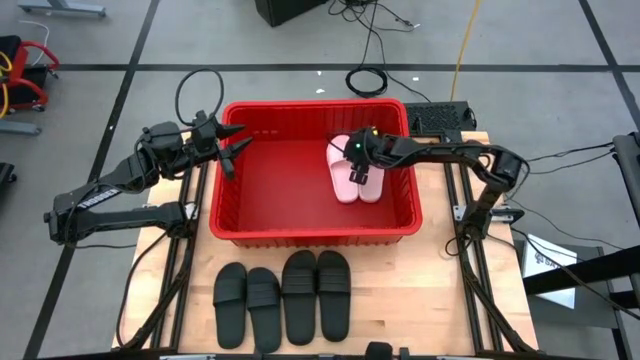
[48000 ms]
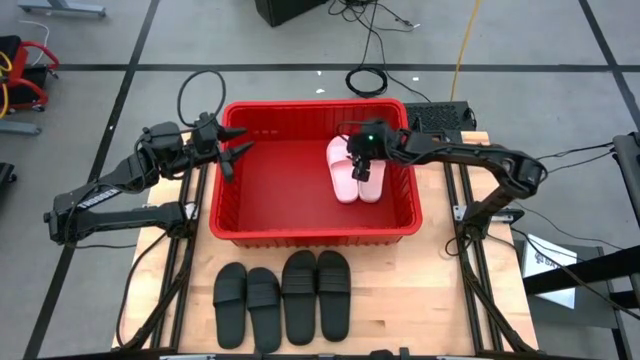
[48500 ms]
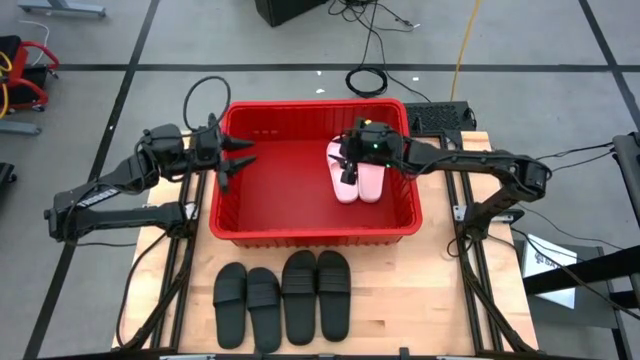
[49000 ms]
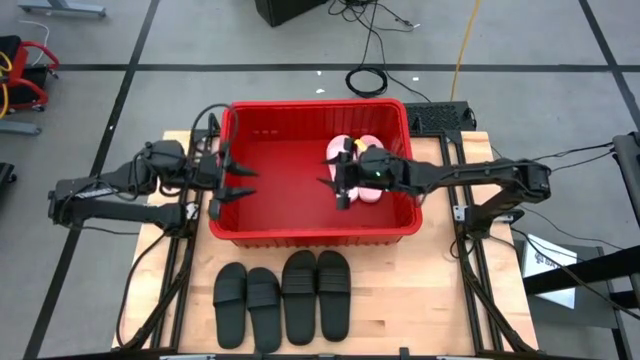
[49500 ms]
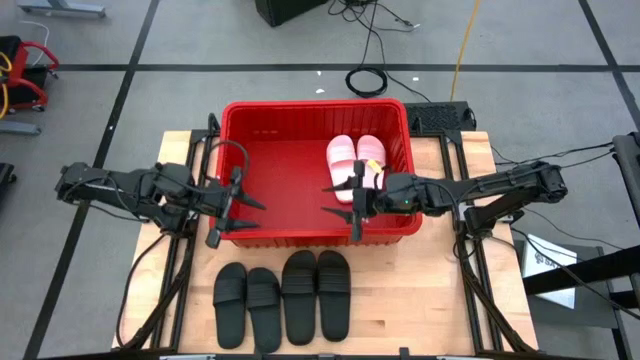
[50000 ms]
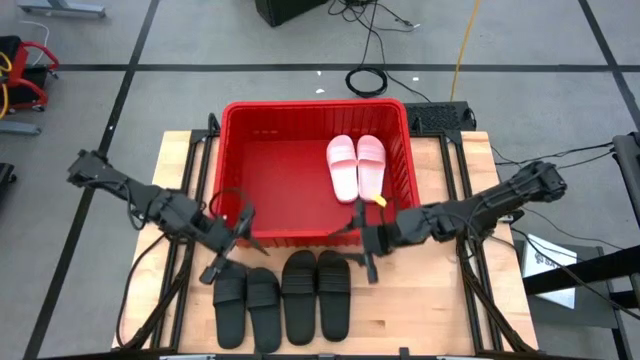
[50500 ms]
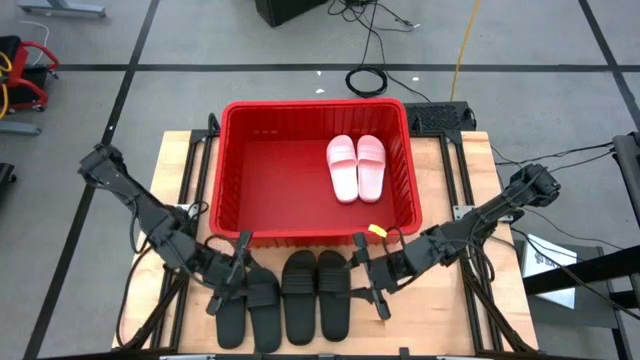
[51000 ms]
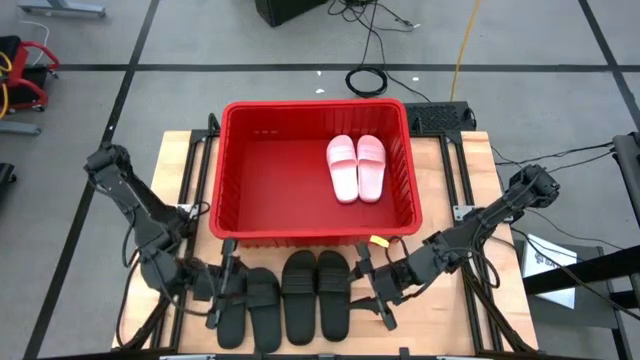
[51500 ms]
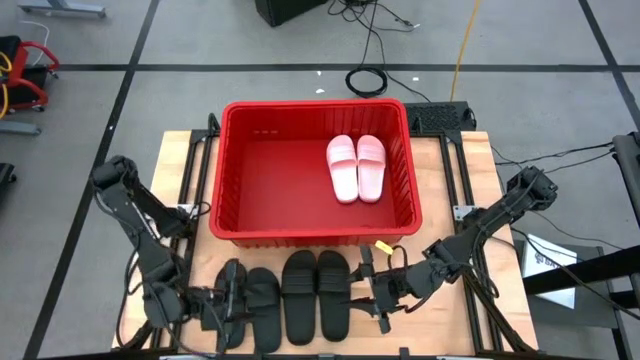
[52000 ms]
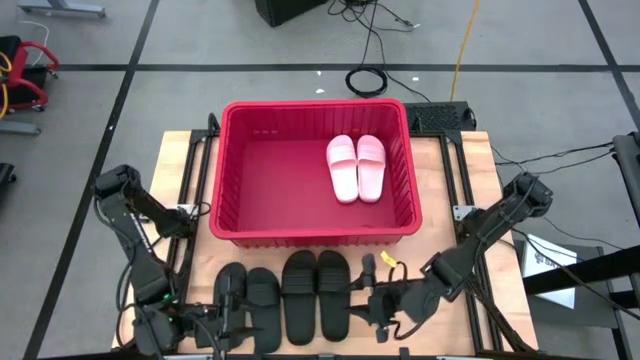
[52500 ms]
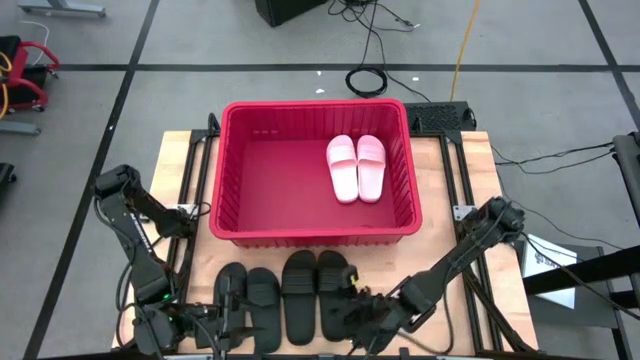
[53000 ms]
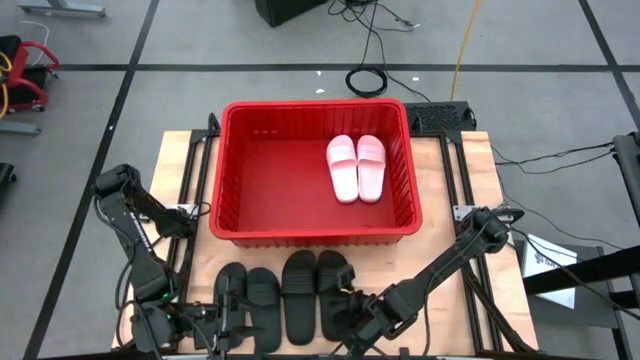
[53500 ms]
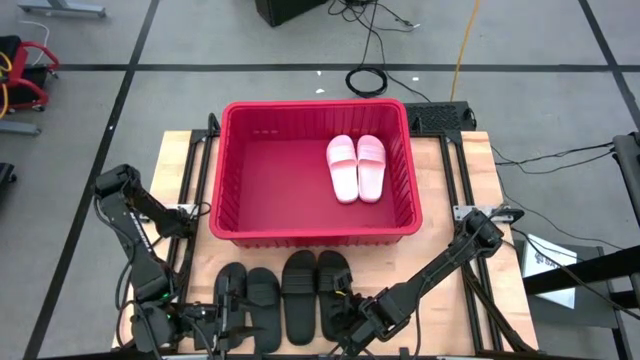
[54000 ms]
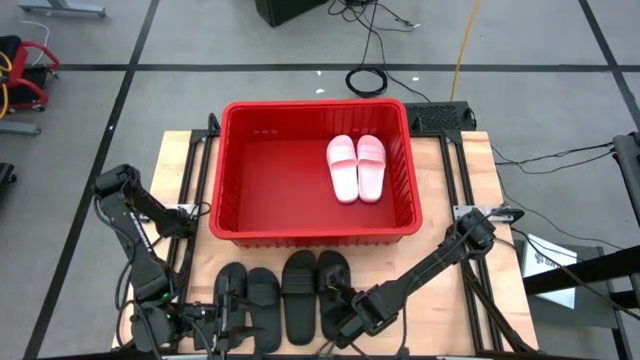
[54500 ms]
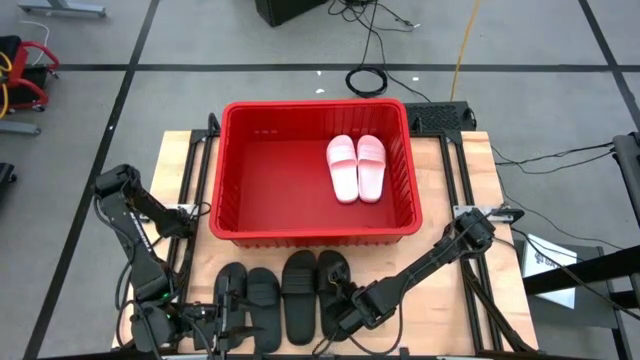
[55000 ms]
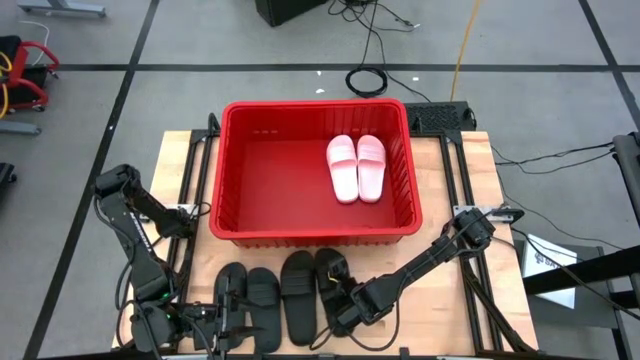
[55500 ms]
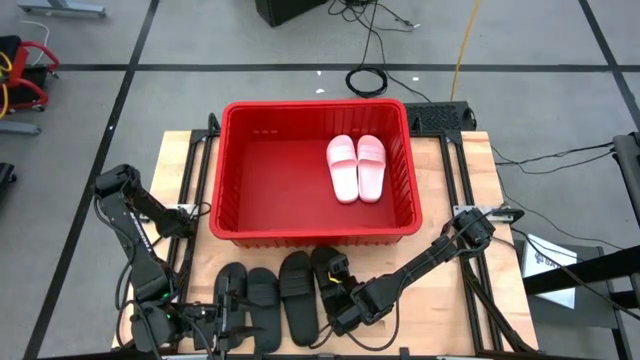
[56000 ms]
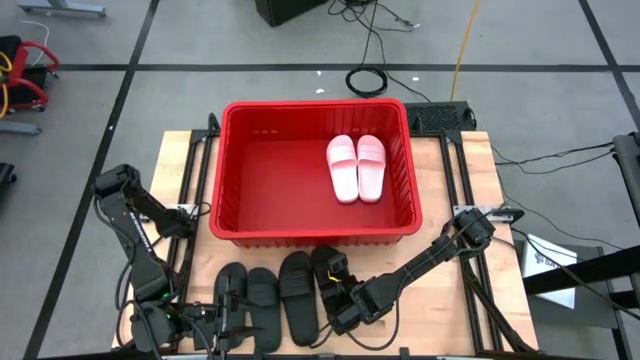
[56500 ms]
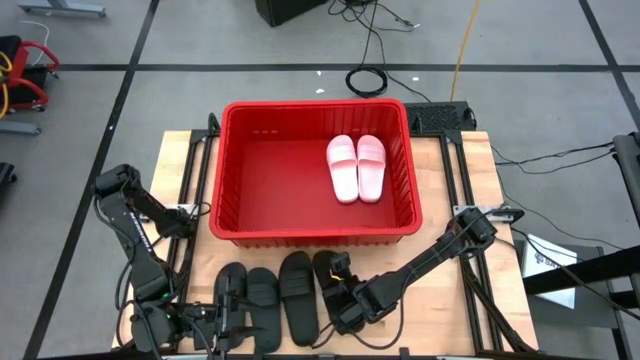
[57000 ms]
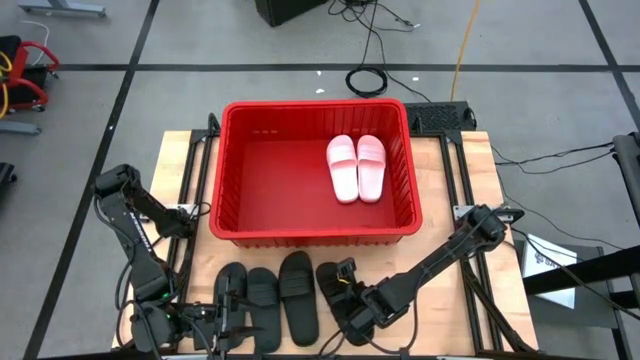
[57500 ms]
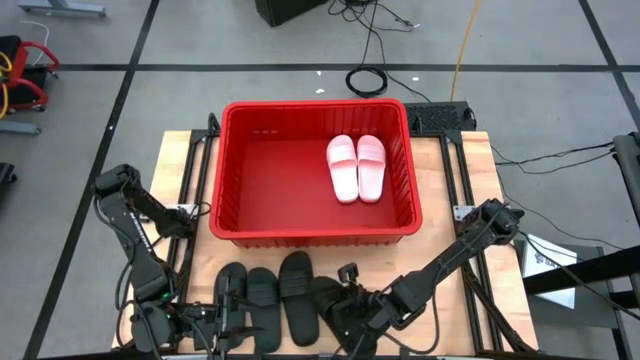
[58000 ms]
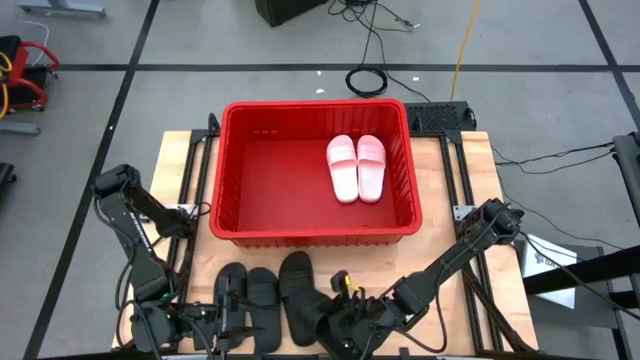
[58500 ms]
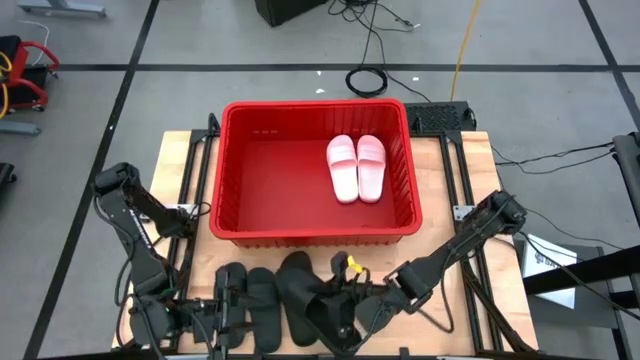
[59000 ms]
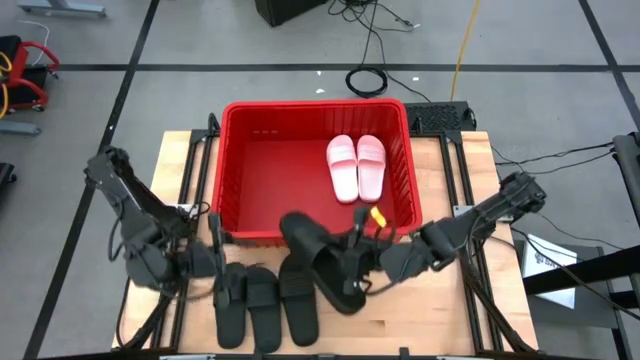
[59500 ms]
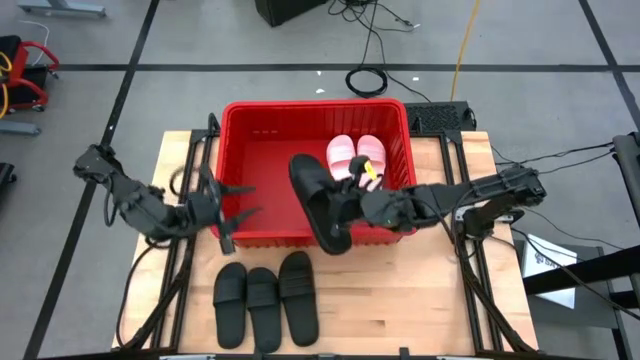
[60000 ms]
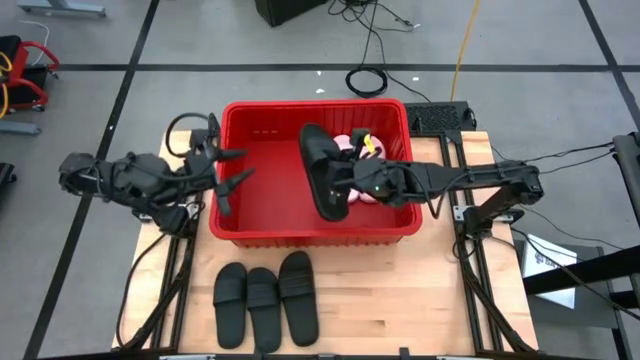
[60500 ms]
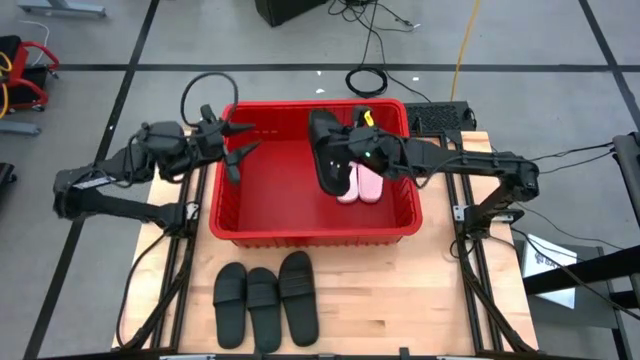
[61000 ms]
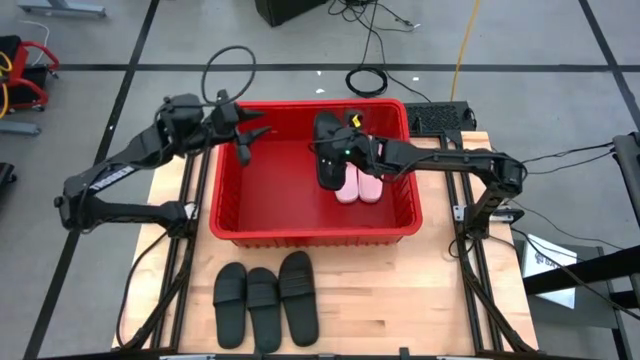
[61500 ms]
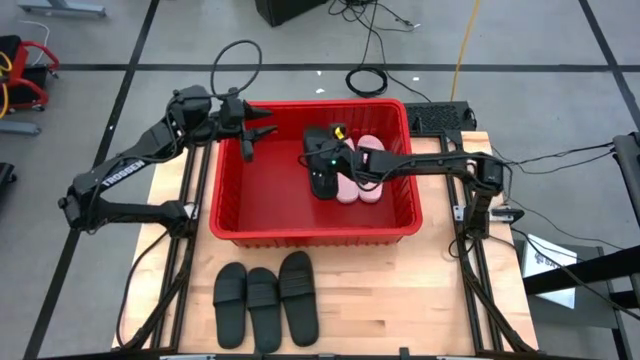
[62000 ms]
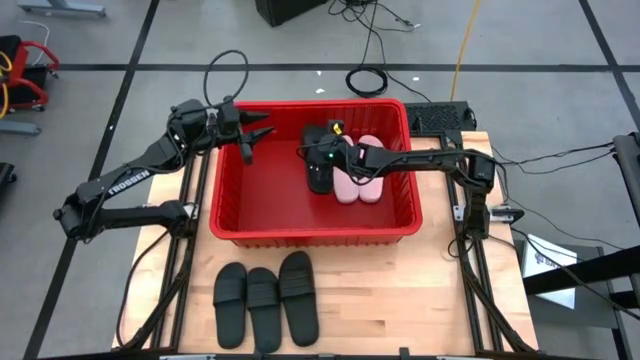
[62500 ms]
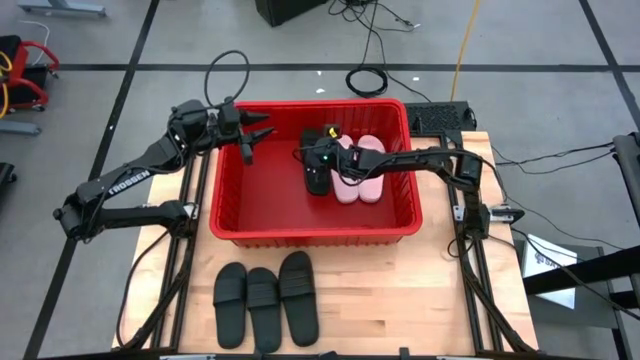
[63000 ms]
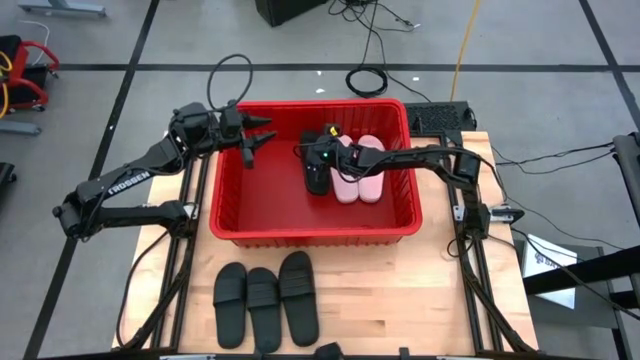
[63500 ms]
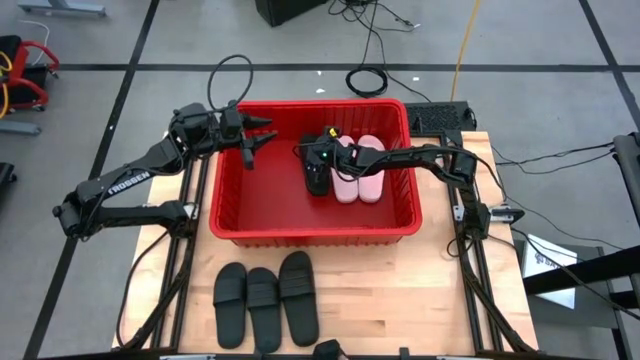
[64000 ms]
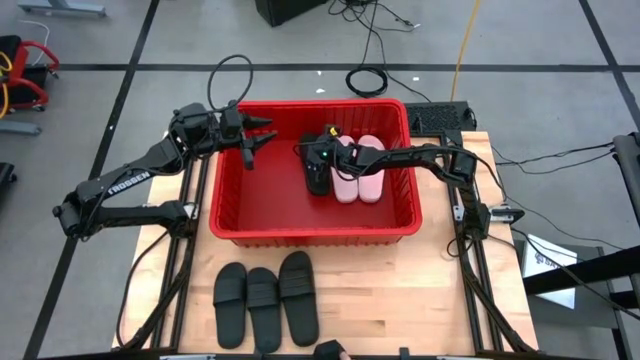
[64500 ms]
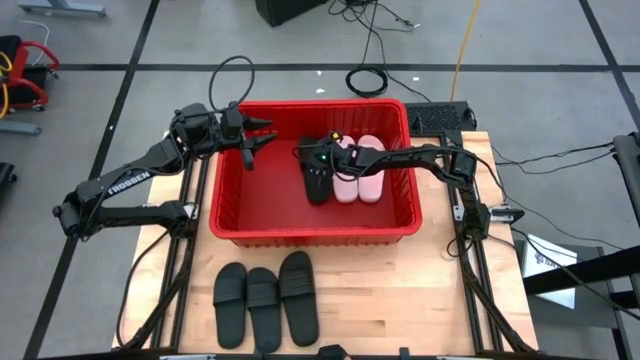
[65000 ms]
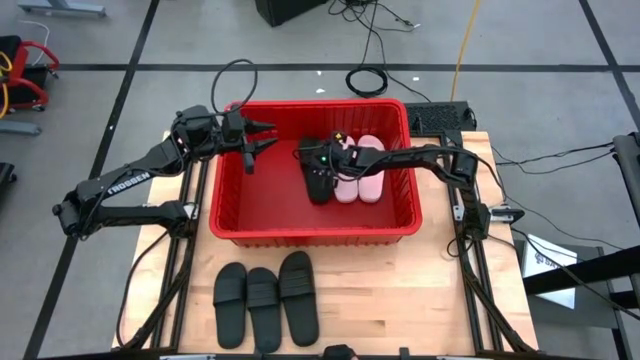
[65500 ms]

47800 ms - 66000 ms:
Task: Pick and place slides into bin
Put the black slipper into the red bin
